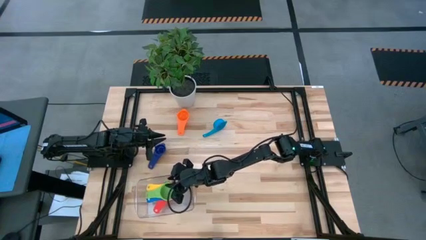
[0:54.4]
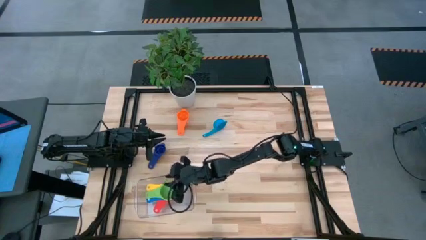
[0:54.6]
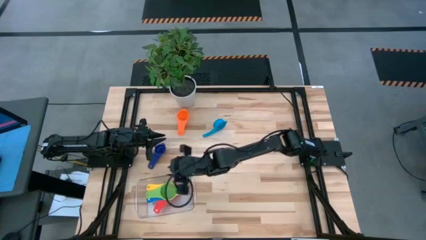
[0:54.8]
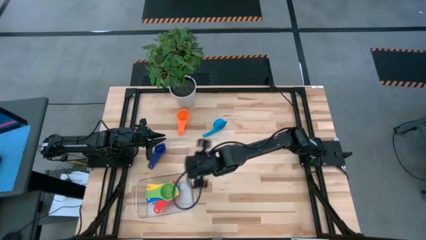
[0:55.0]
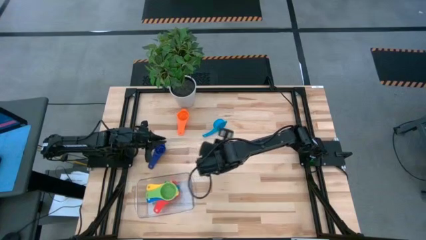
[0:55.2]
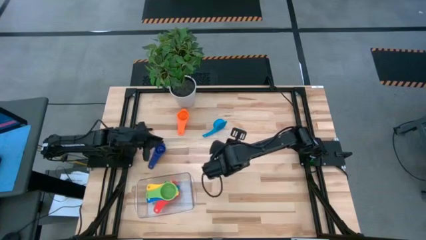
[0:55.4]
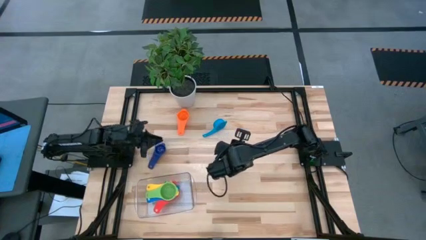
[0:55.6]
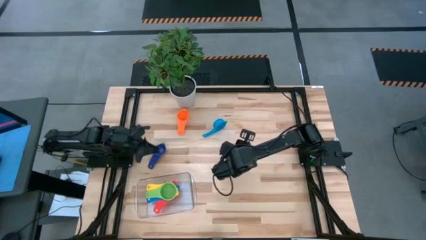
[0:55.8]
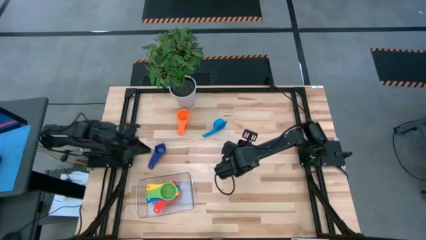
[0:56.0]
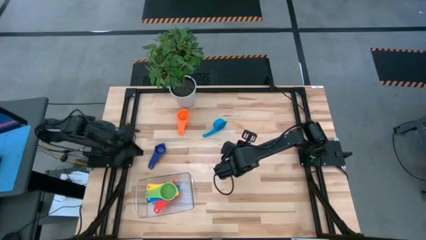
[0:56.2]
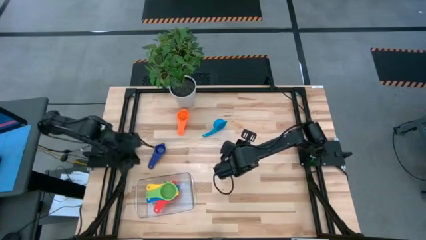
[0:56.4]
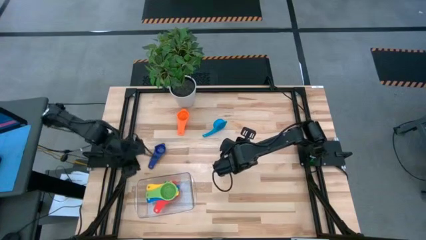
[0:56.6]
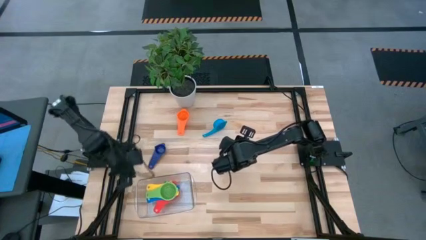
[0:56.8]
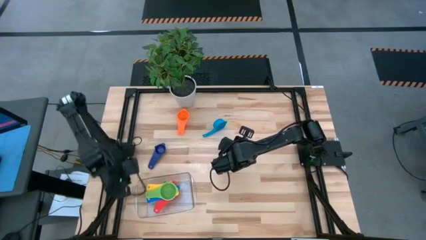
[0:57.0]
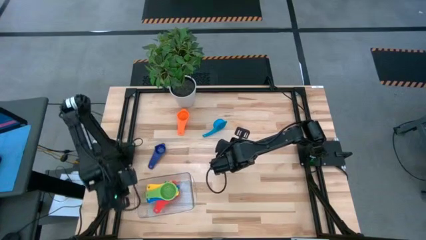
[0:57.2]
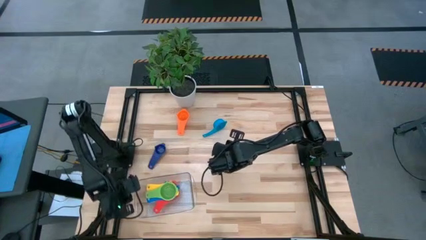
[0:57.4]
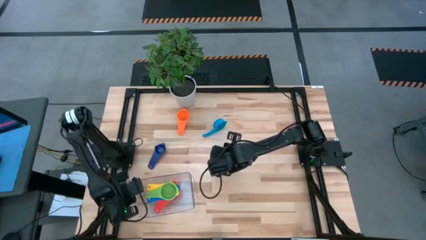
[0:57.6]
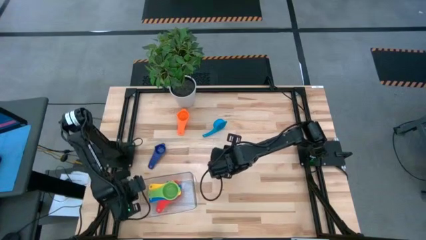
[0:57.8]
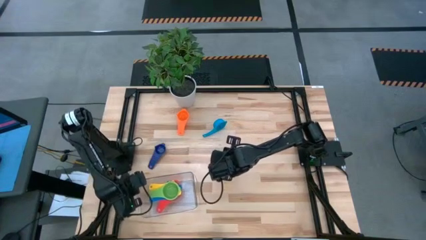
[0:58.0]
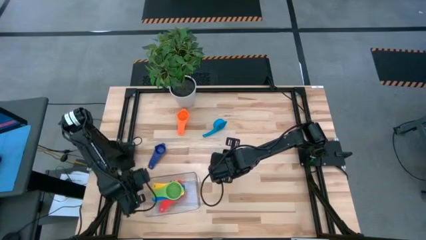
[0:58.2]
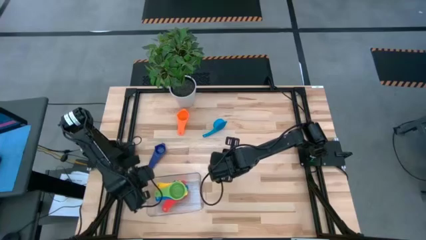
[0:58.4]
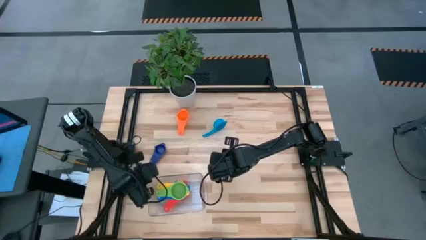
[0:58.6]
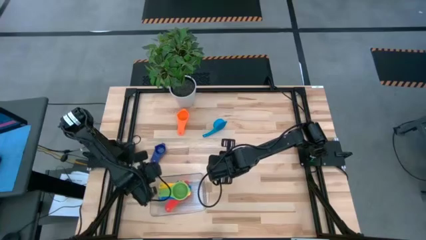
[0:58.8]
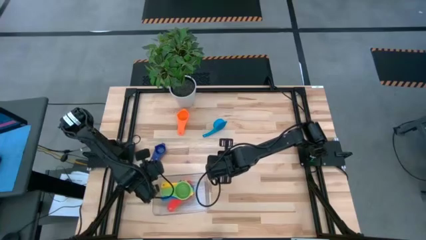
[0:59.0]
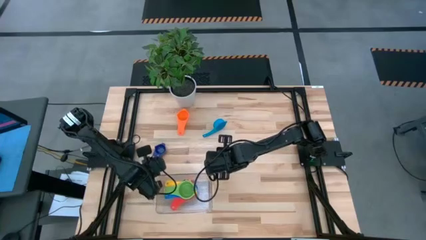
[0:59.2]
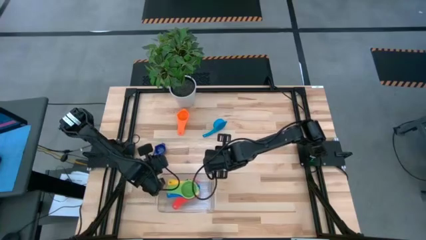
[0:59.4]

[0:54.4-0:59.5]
Task: Nest measuring cups in basket
Adjust the transparent bin on the table

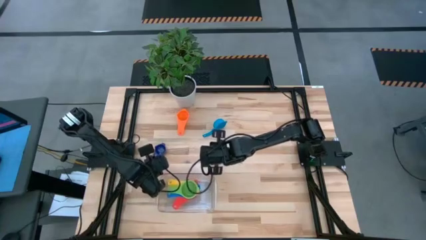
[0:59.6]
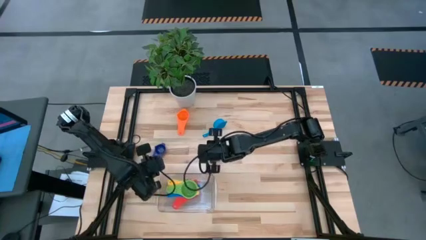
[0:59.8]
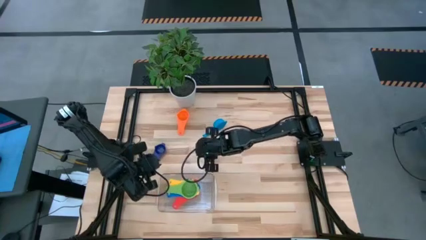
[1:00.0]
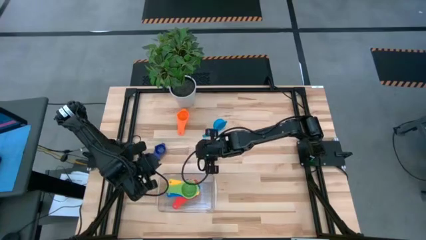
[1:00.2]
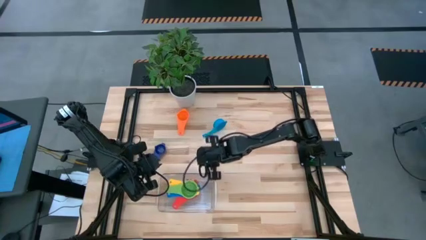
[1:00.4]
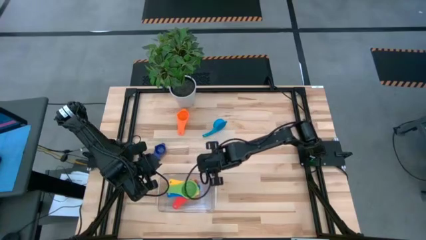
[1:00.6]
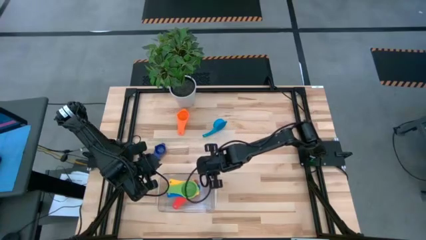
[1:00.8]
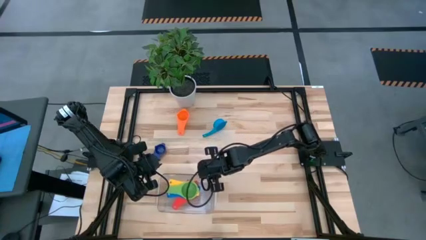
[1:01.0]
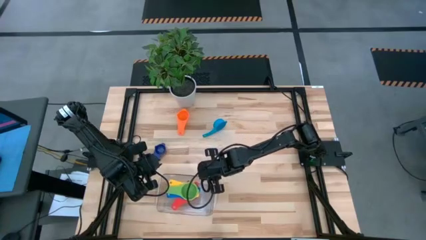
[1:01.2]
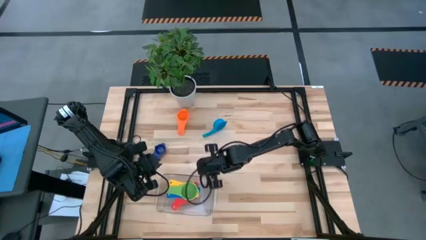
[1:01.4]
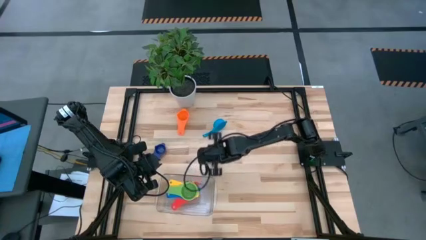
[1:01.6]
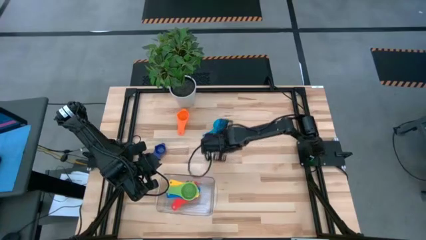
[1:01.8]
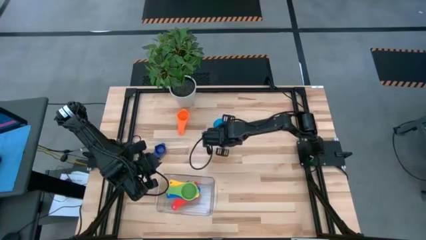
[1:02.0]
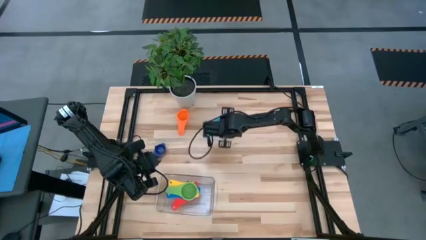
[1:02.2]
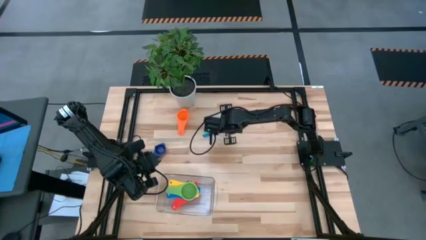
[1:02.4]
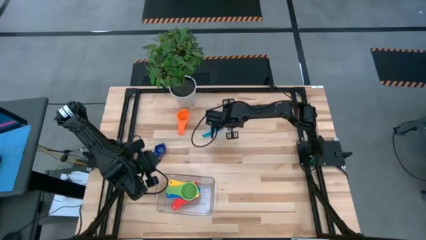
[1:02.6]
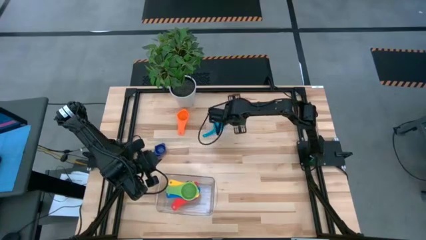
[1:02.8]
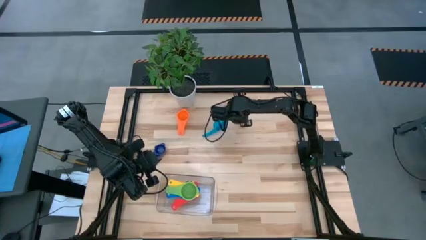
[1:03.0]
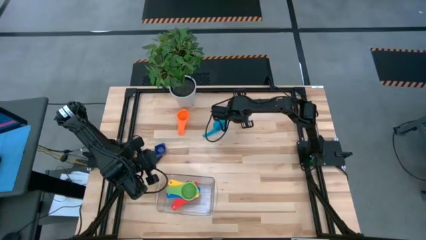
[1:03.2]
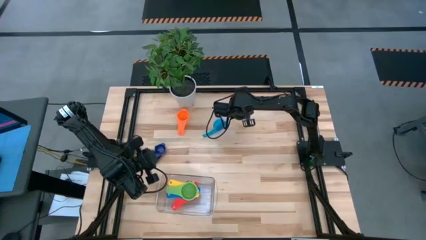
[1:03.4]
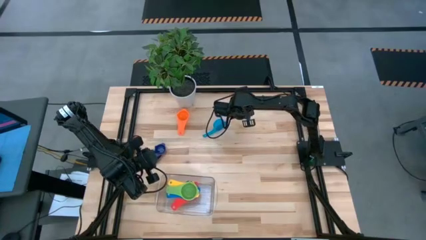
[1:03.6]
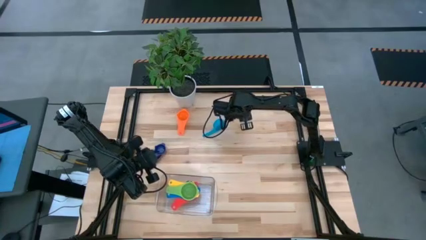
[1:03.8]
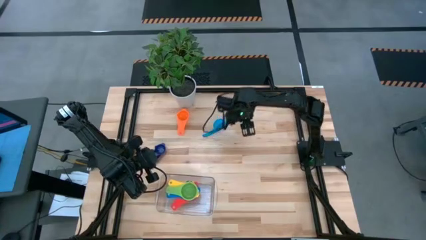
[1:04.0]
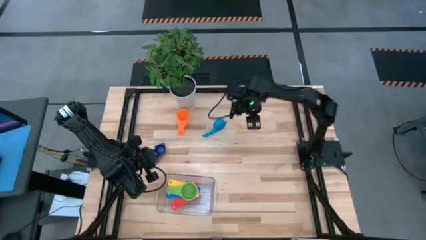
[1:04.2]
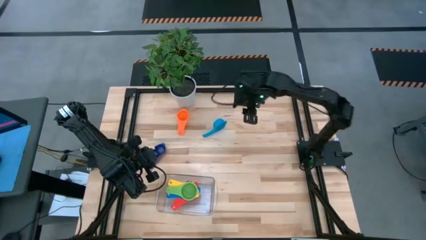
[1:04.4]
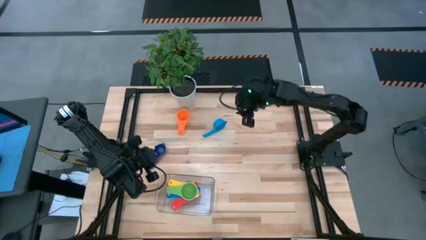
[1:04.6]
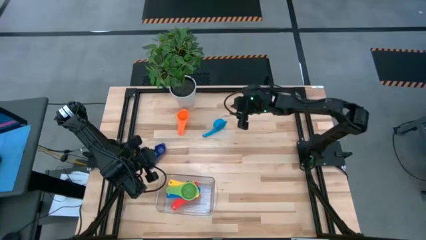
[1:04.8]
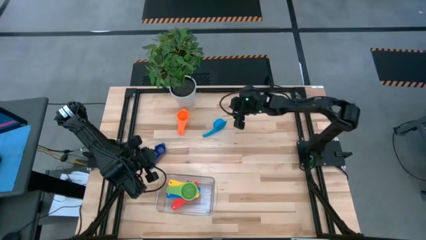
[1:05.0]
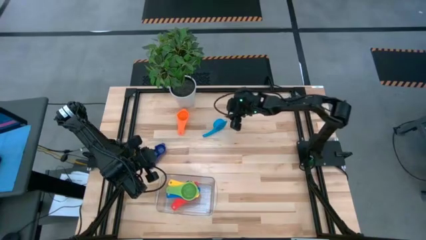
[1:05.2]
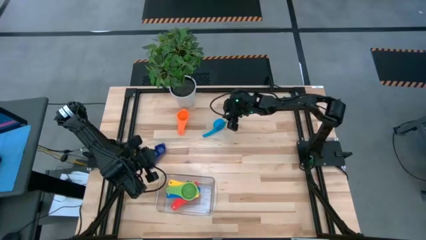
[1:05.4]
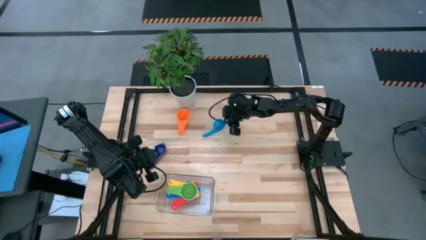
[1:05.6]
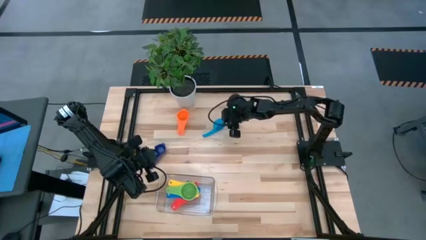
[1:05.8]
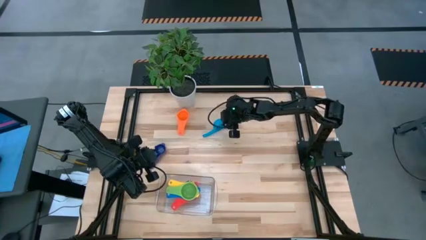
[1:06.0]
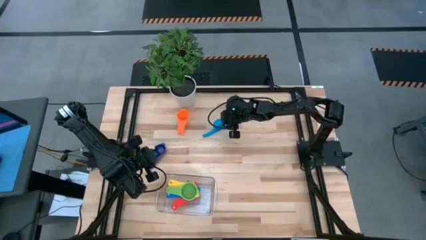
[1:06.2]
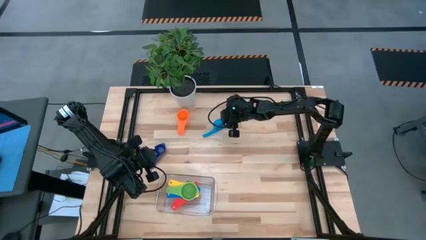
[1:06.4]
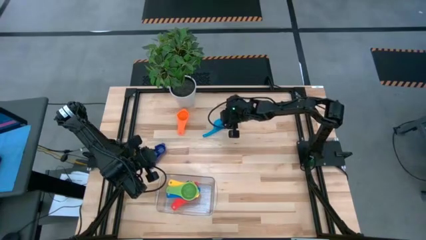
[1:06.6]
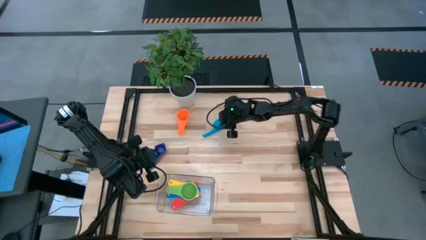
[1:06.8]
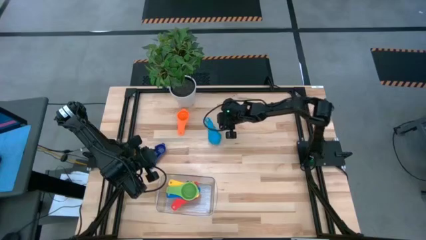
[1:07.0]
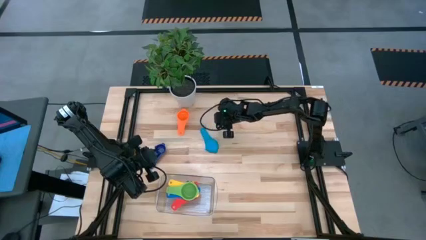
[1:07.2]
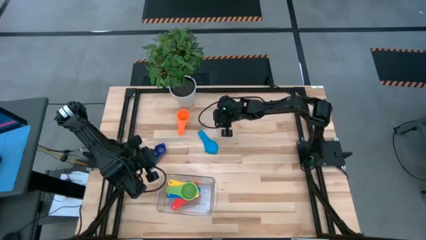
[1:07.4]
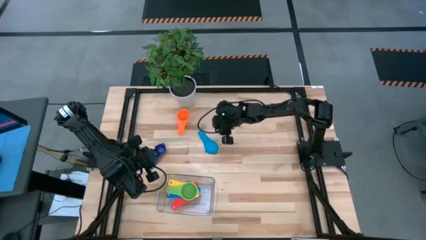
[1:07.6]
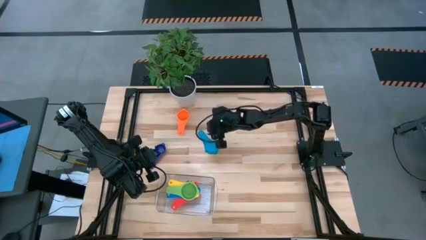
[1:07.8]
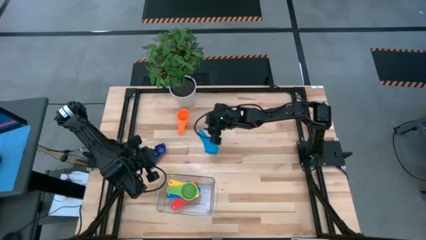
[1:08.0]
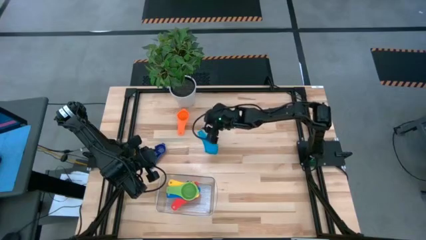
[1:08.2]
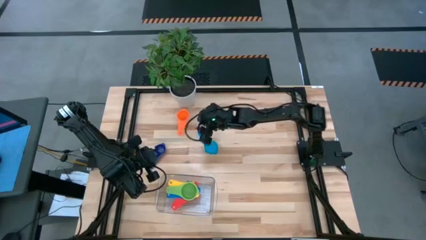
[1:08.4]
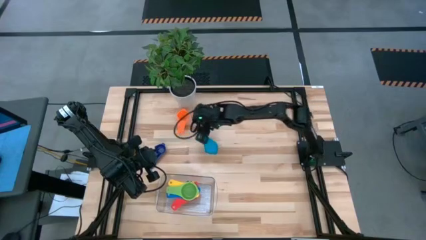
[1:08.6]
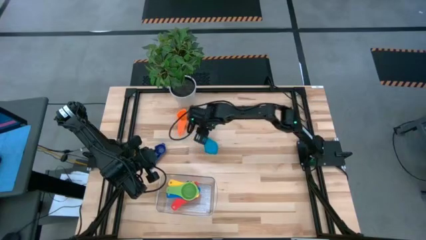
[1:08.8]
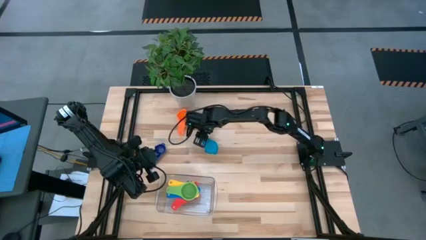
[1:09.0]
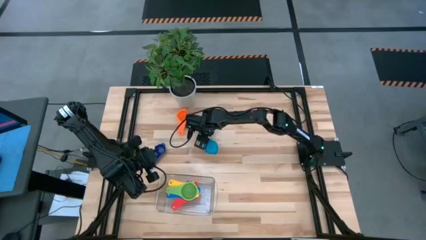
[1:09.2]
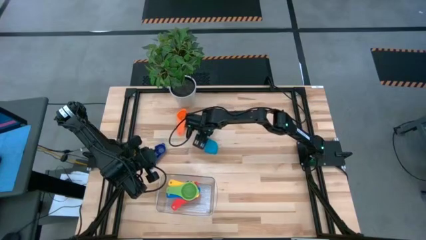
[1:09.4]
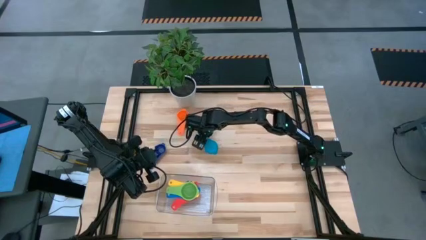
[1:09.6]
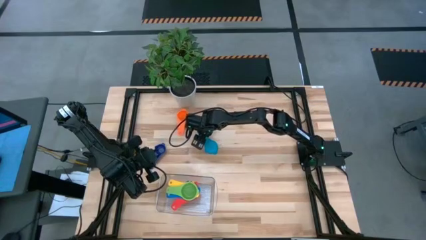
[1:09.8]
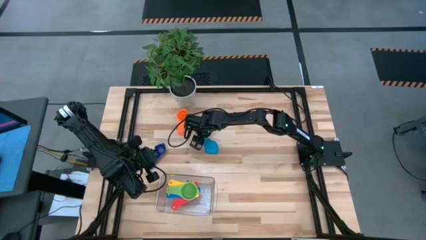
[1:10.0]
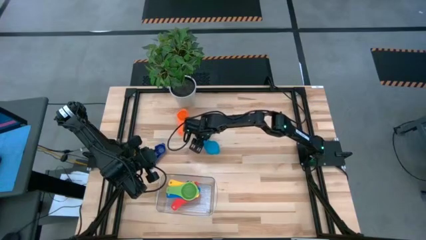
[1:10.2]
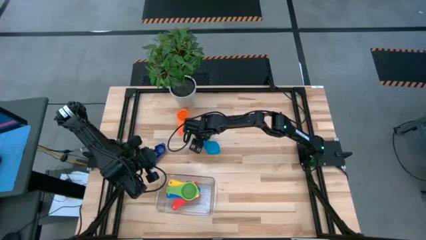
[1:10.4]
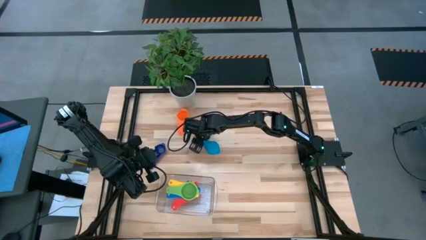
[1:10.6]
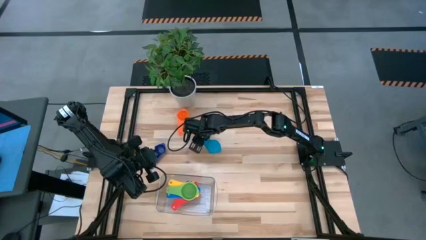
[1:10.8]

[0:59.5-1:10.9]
Stack the light blue measuring cup on top of the green measuring cup
